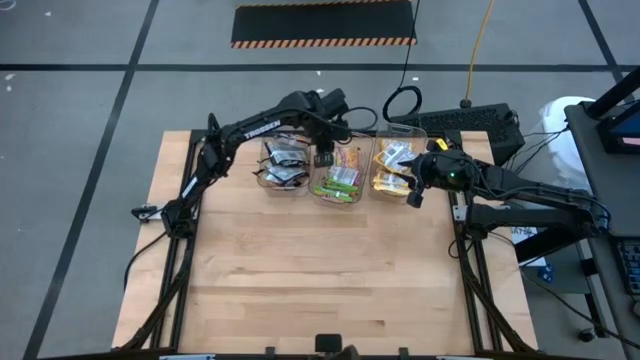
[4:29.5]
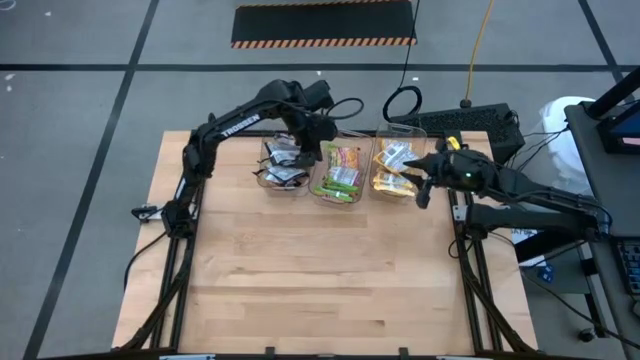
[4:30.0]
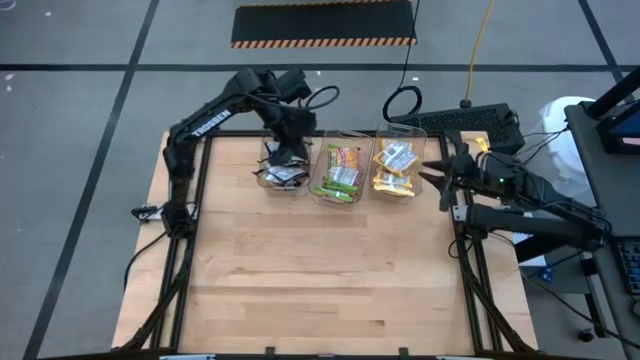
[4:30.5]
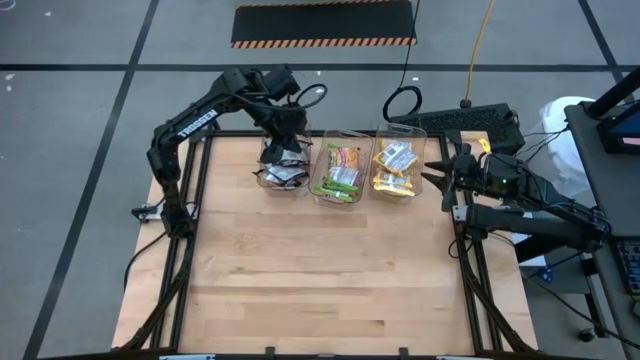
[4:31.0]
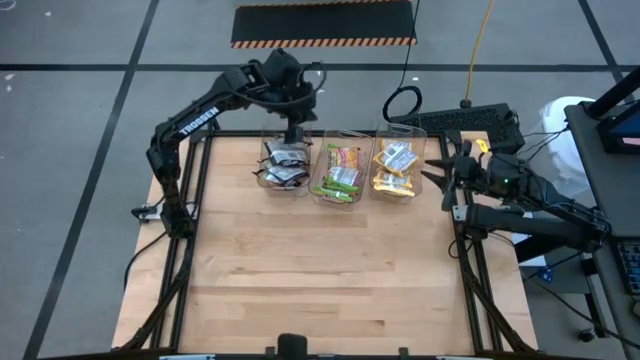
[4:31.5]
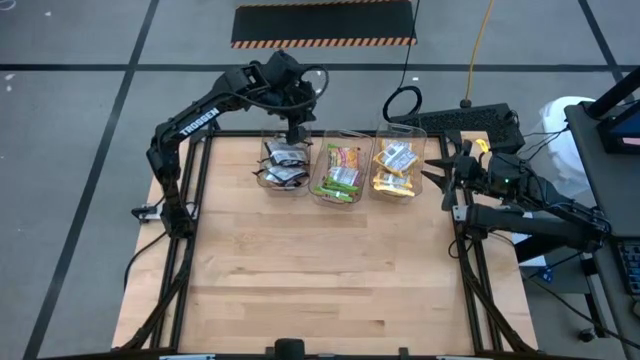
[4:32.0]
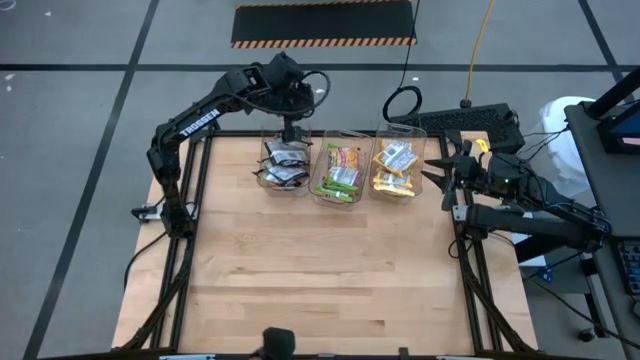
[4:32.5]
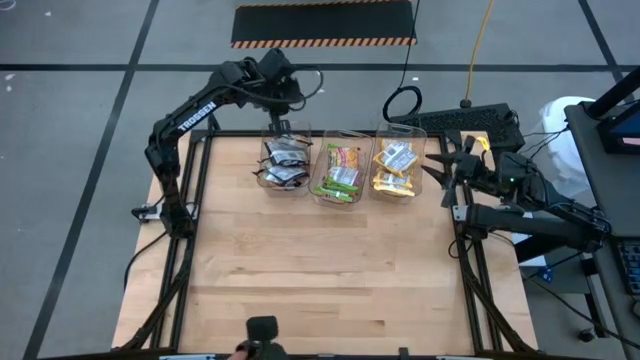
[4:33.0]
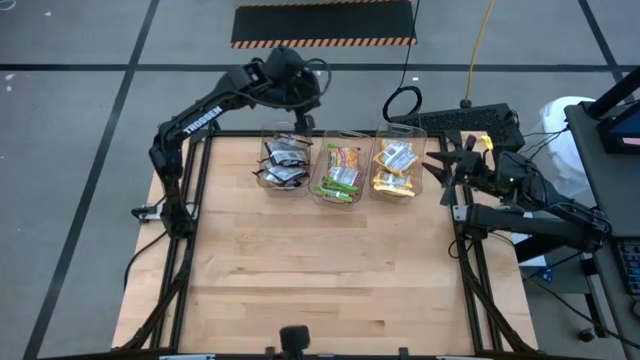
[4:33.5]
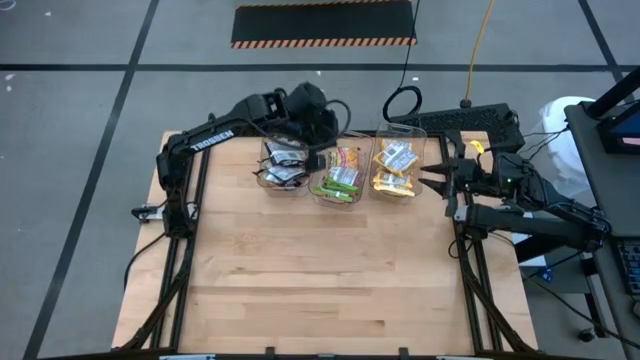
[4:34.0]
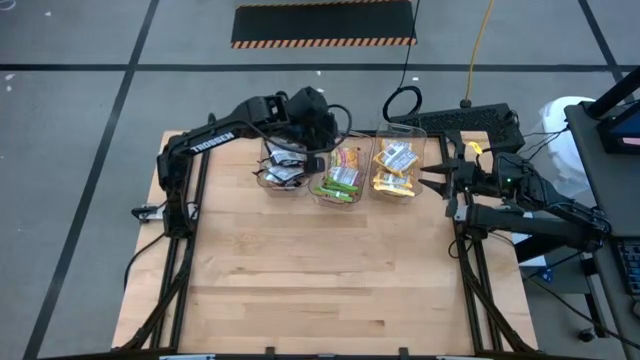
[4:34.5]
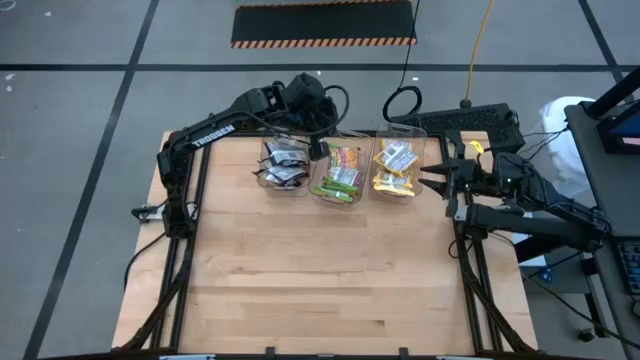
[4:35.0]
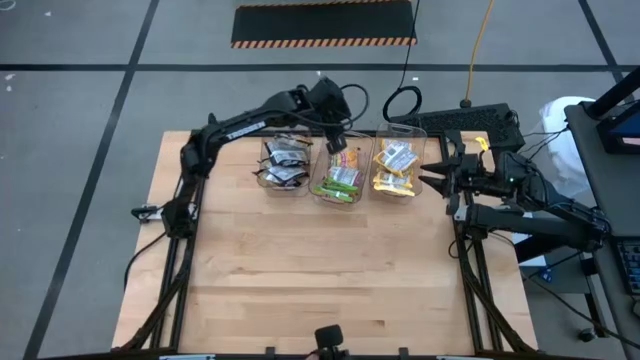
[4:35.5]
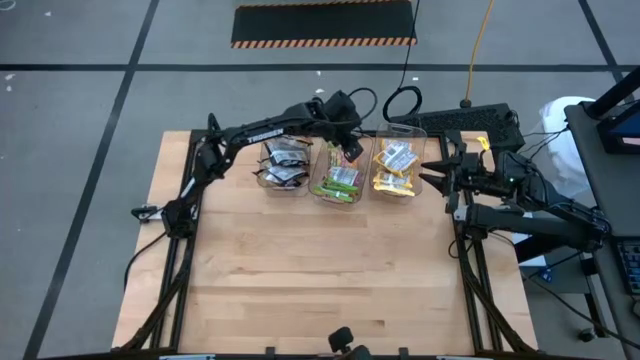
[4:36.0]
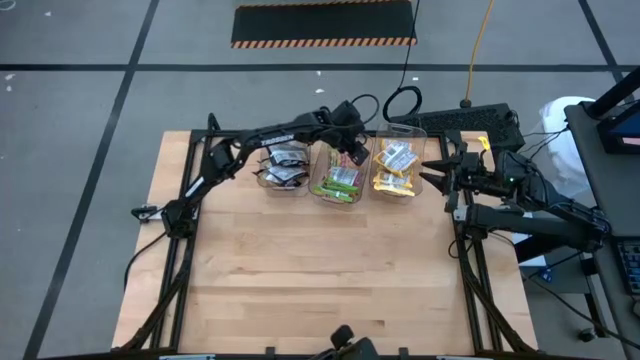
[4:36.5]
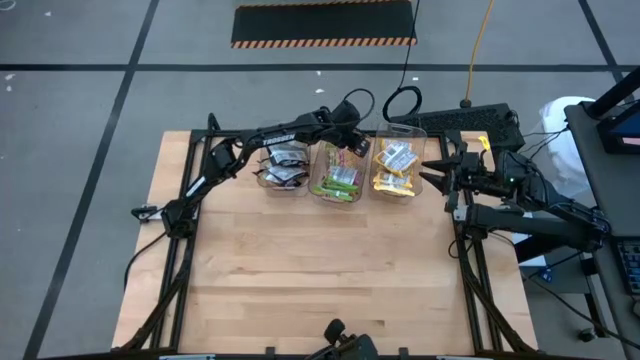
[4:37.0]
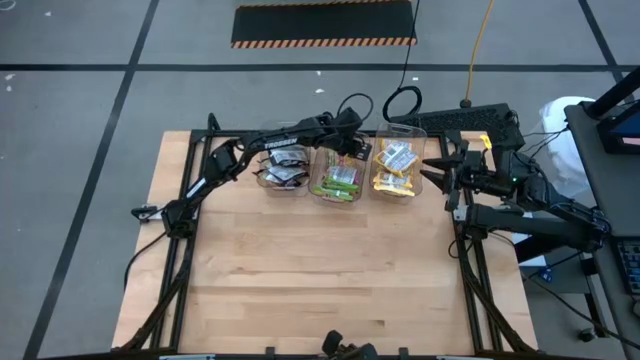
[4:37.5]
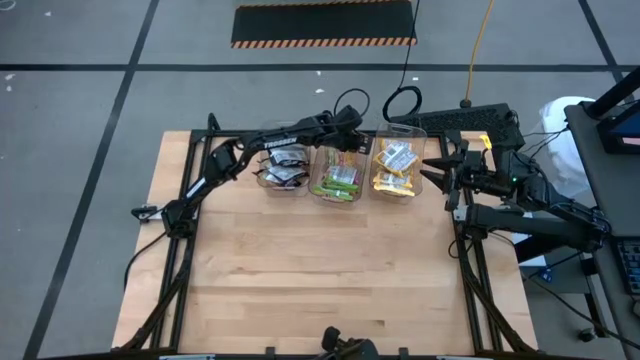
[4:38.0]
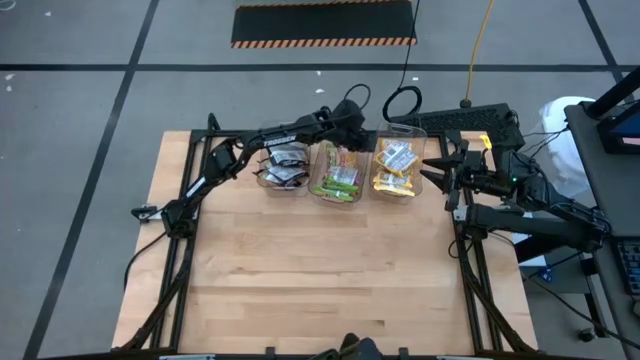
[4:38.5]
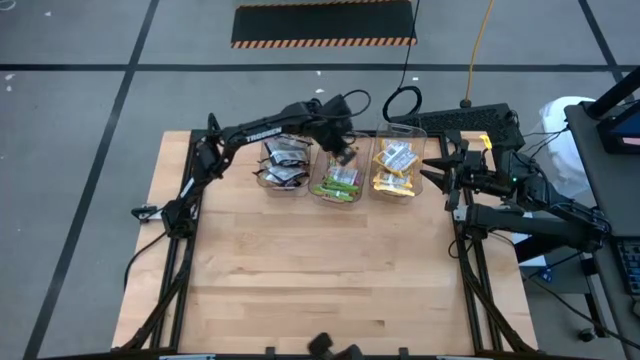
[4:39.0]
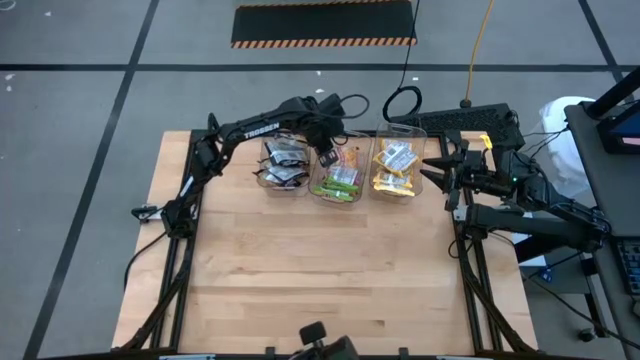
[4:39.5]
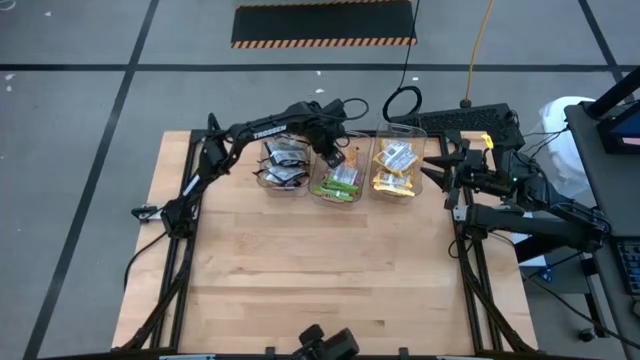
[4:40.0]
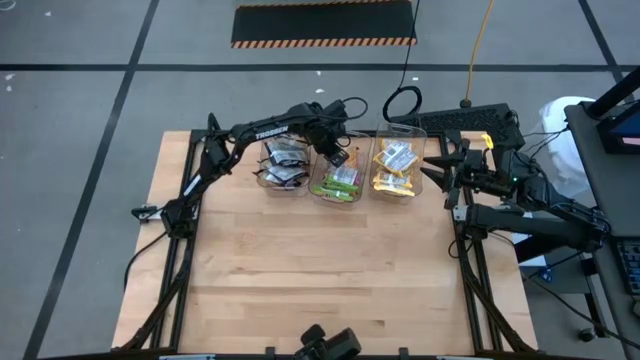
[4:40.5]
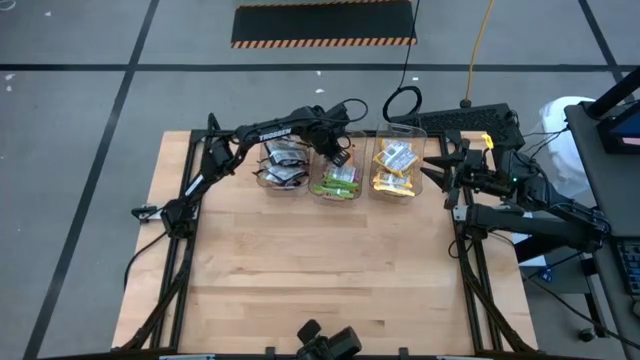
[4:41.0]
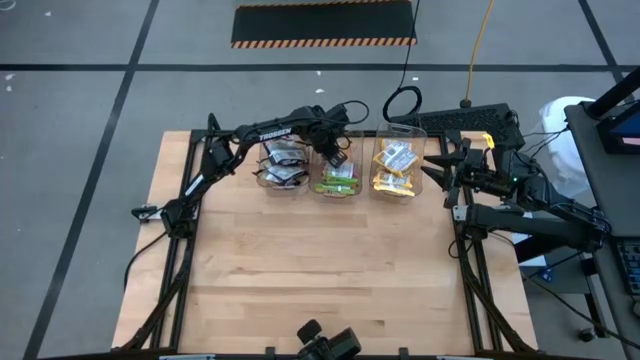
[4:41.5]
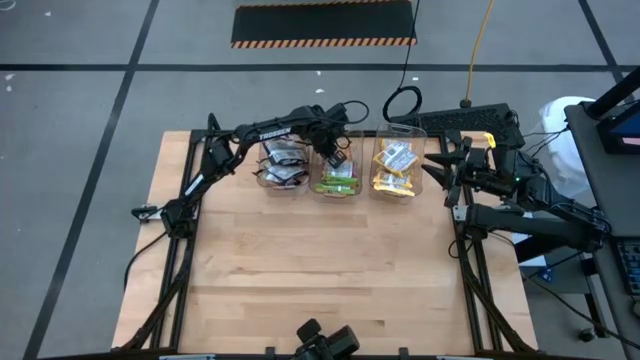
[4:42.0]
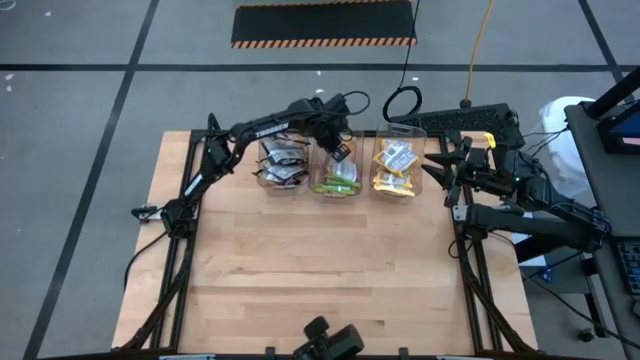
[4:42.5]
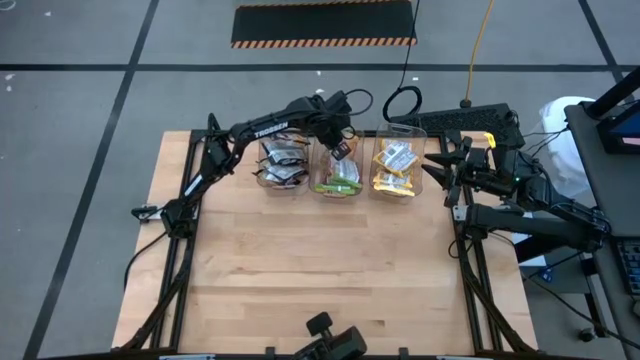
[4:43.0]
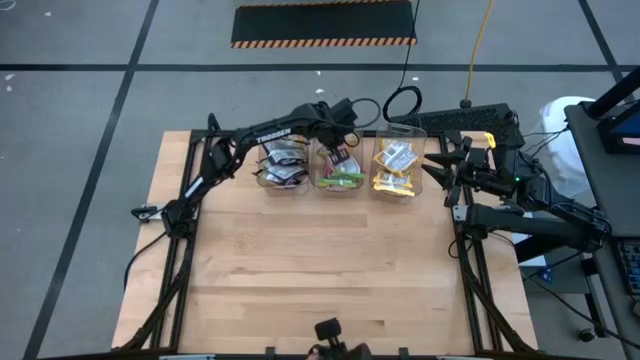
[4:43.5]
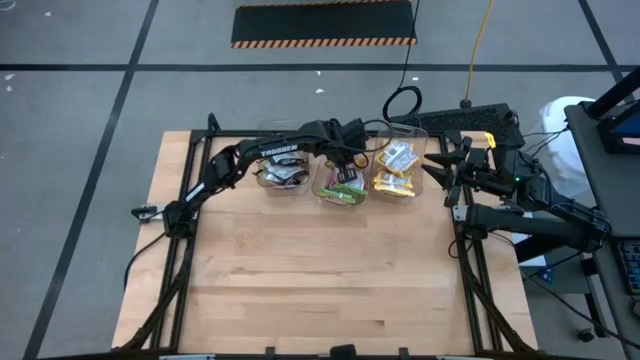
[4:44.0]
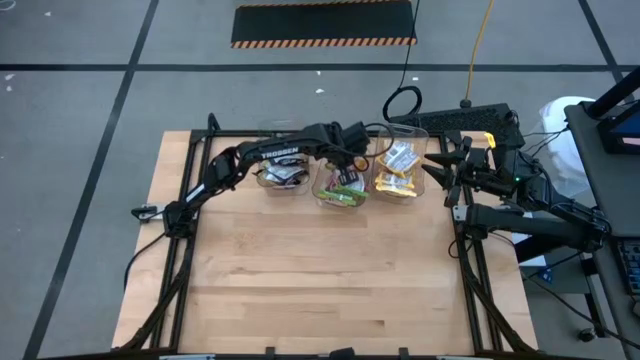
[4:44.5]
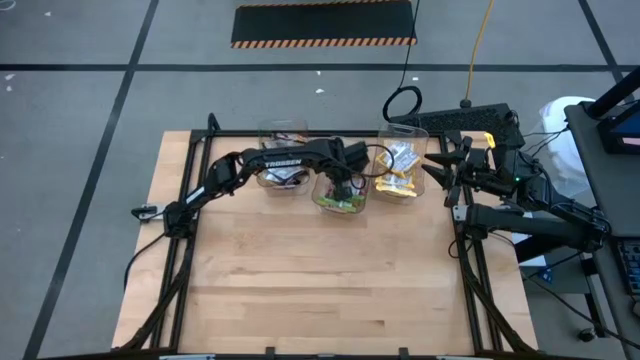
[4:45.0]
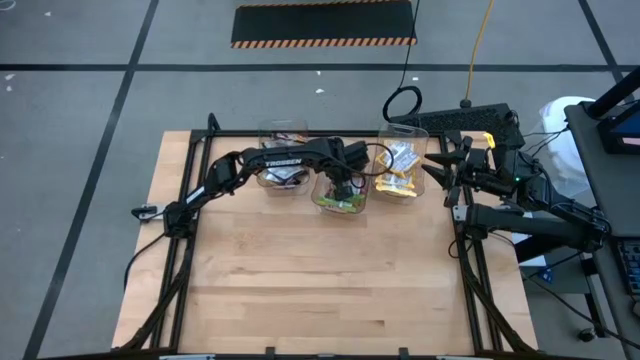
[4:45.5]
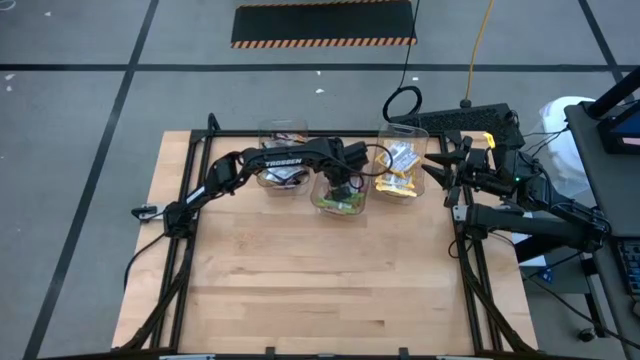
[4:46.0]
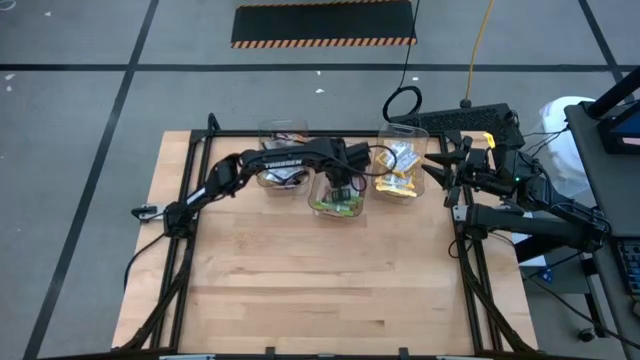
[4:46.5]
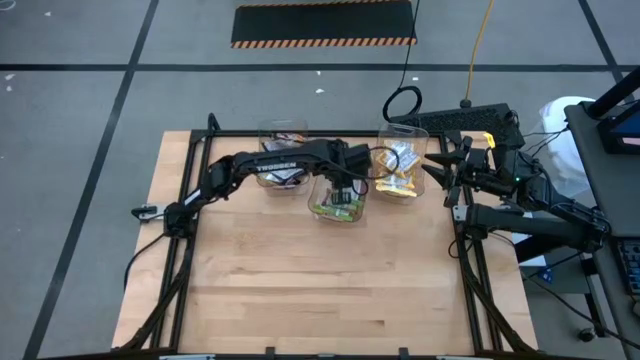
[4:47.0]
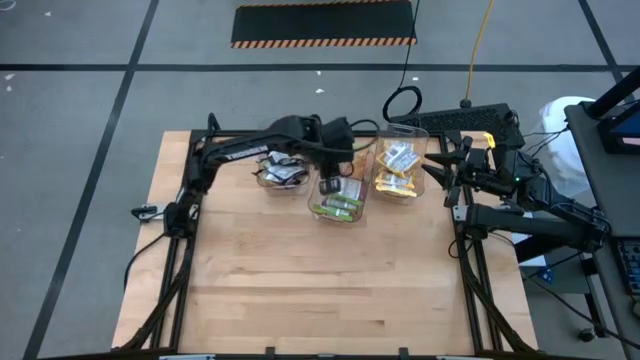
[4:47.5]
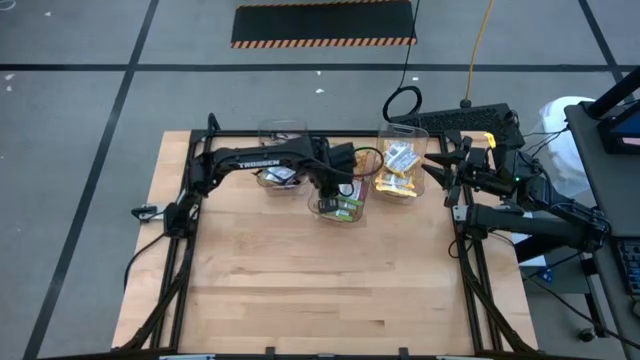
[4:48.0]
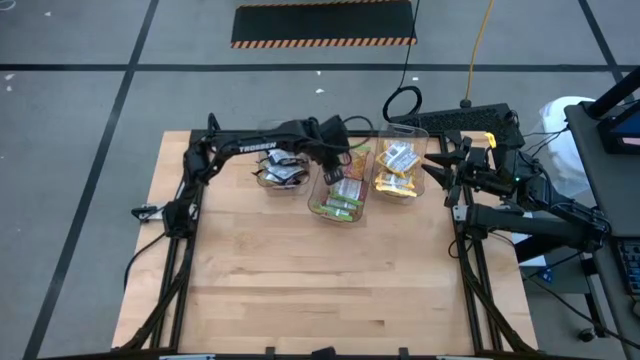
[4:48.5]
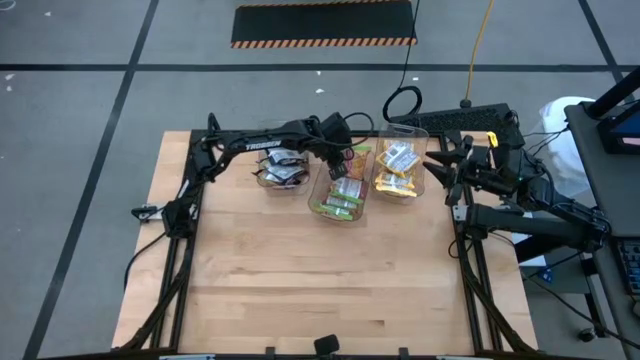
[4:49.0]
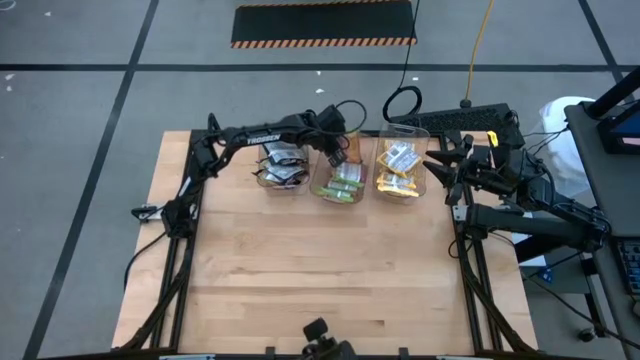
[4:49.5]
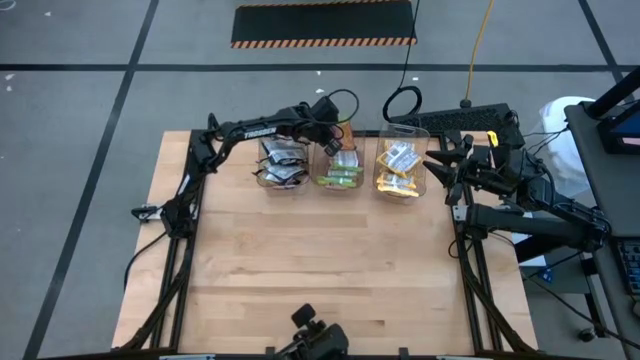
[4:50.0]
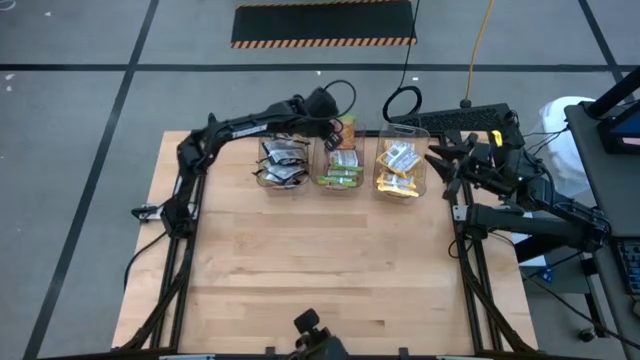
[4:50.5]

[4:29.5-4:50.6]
Task: Sort Maruchan noodles
Adjust the green noodle pack in the middle transparent bin
